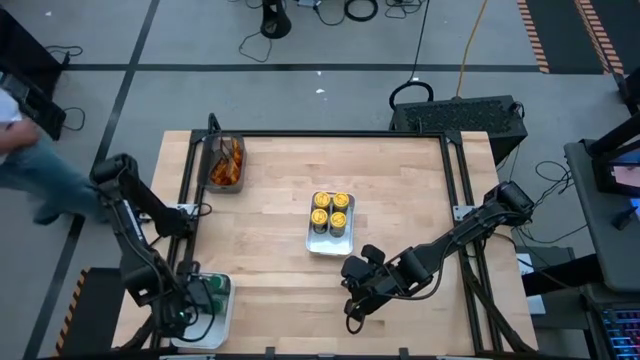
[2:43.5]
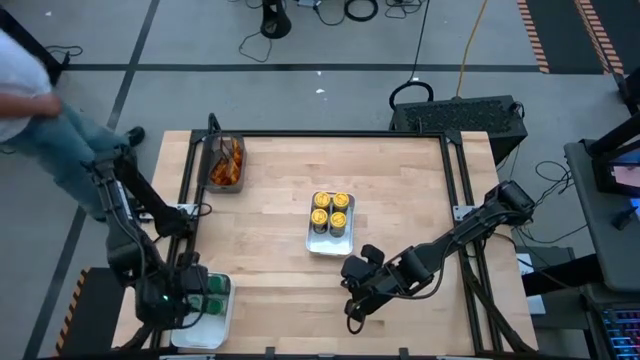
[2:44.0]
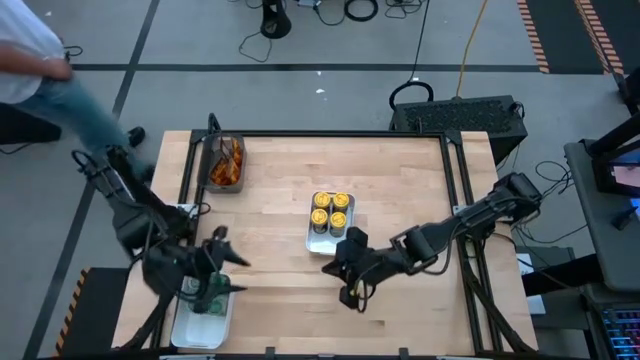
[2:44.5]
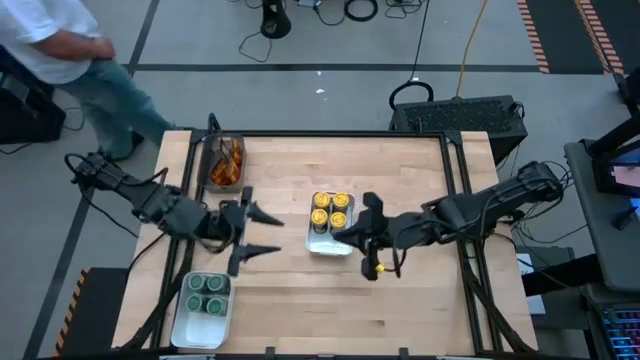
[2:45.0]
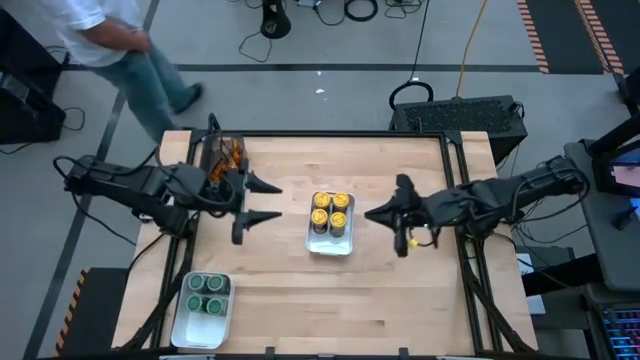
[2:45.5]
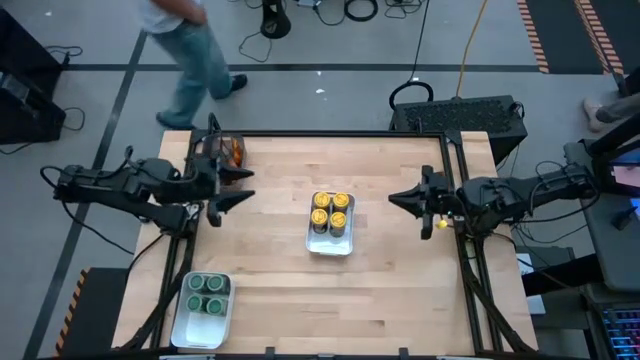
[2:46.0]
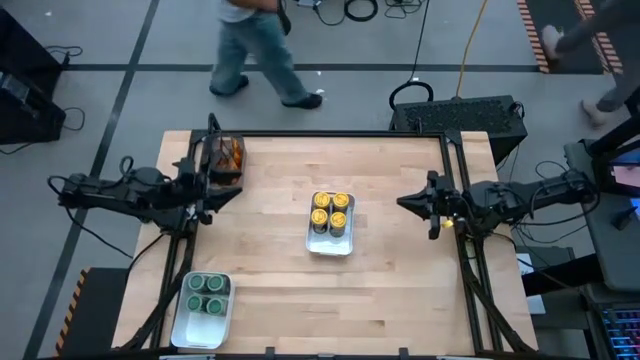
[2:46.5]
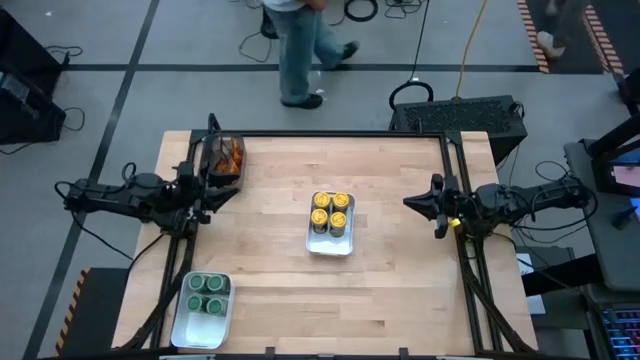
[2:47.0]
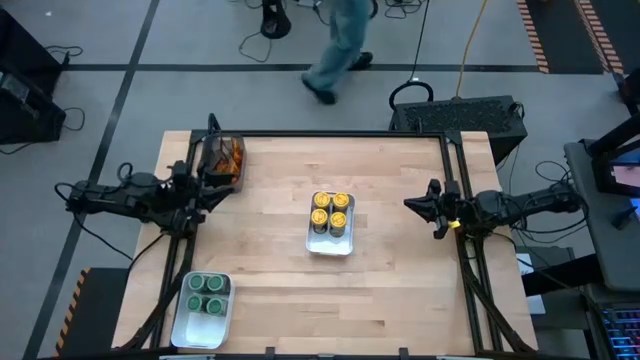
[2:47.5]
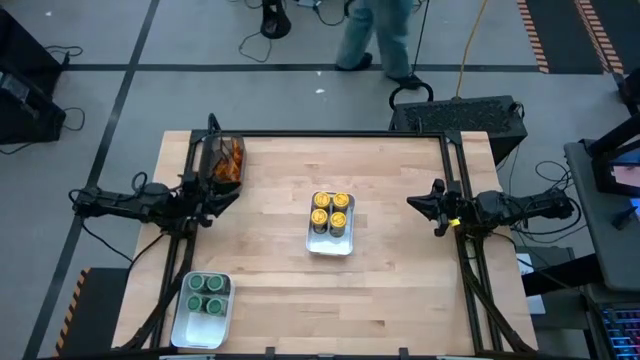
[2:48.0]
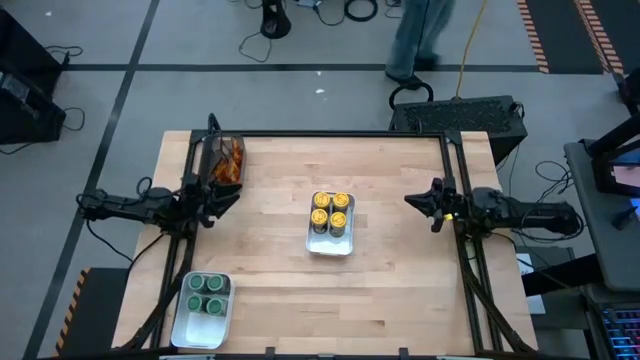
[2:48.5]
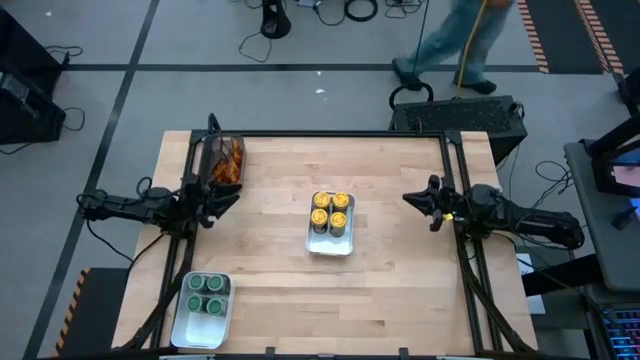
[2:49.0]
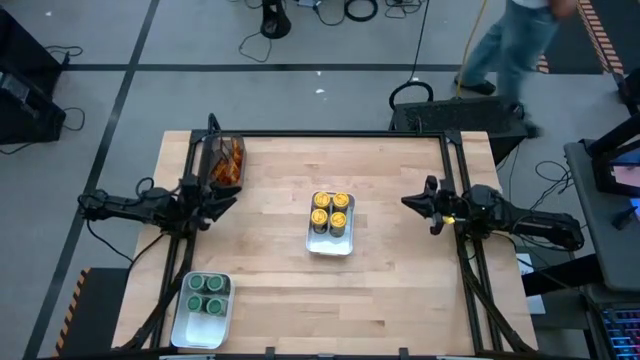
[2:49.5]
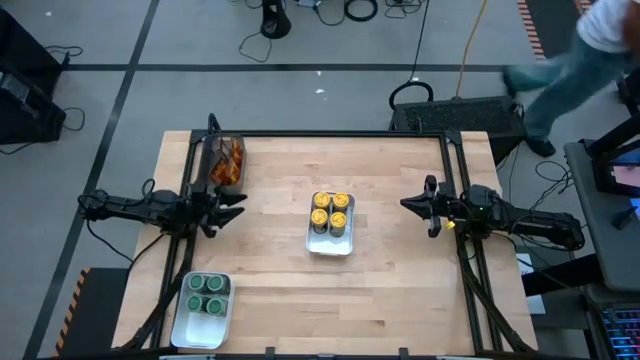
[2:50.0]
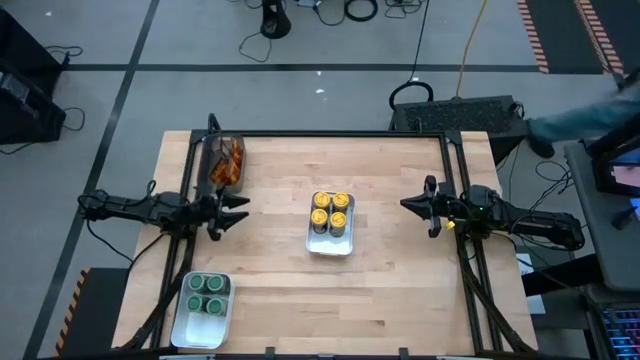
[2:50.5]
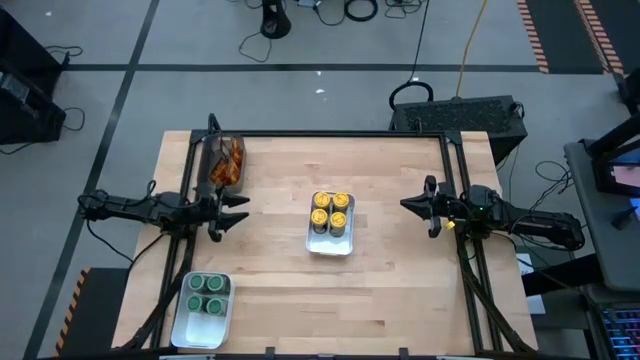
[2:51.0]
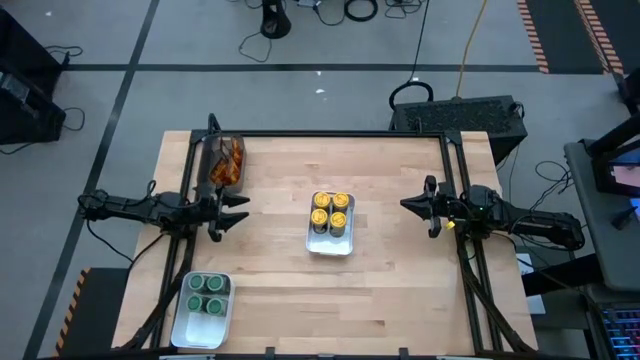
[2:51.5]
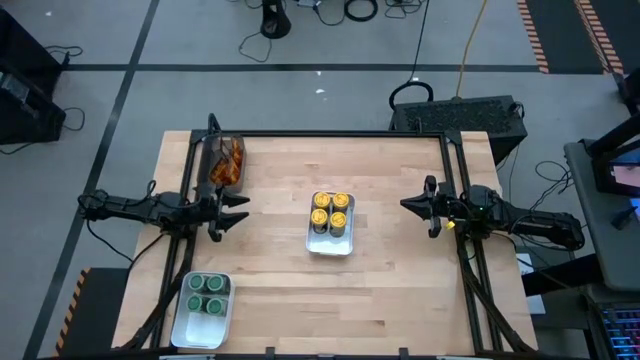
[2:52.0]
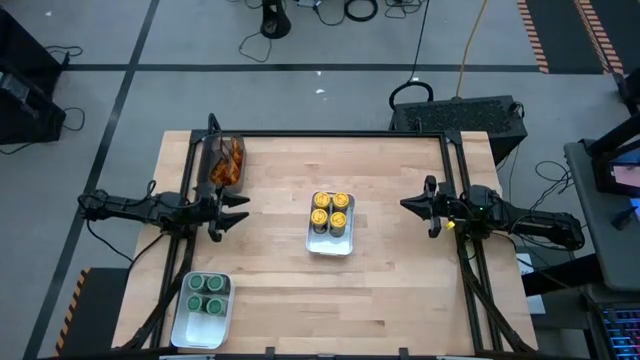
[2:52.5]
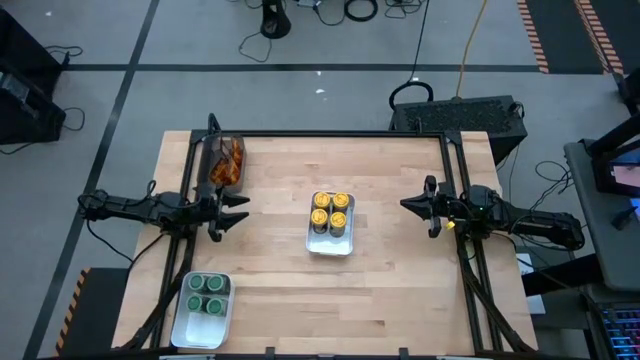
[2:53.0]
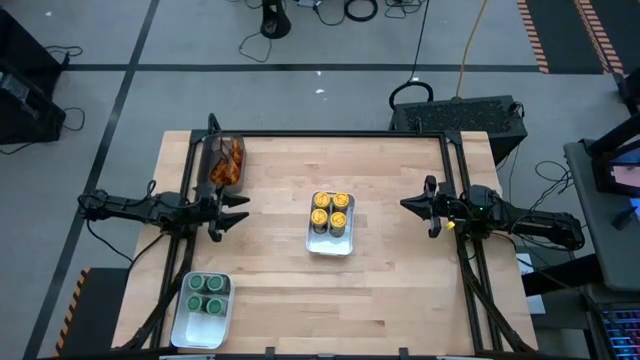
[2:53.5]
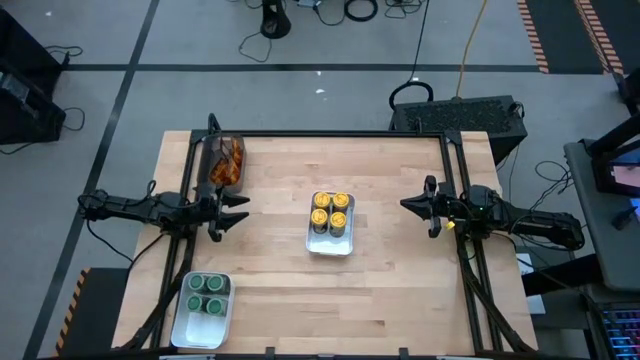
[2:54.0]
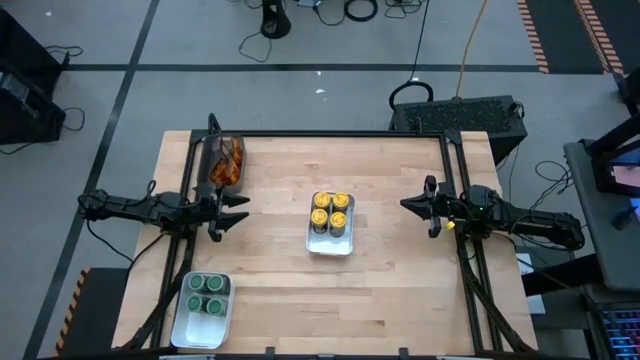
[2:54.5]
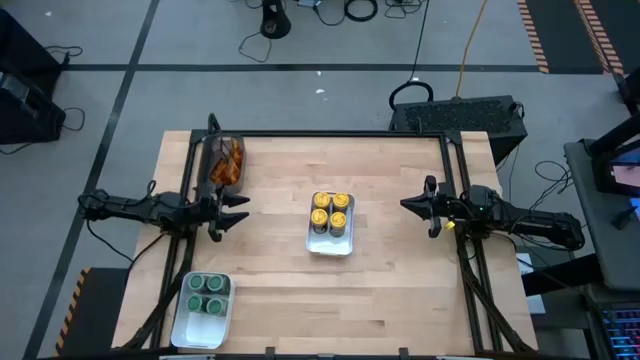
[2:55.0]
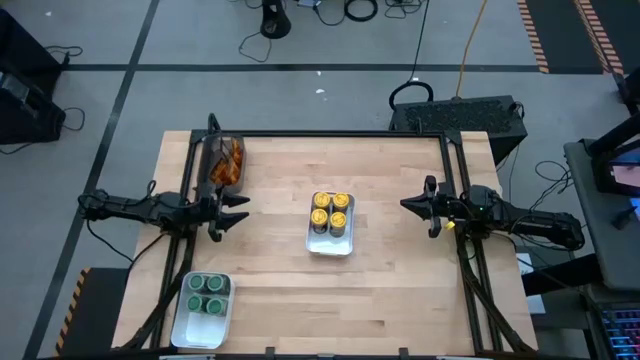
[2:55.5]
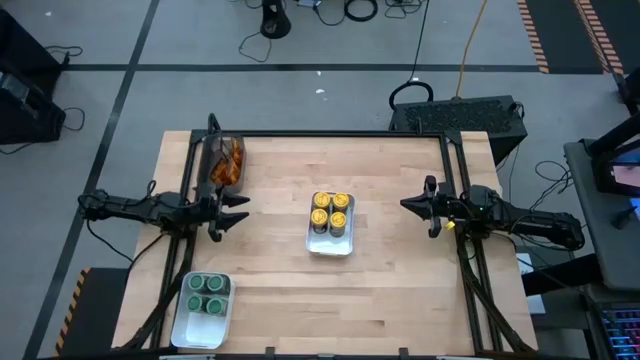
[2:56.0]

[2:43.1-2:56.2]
Task: Sort spices by type
Return to Home Position
